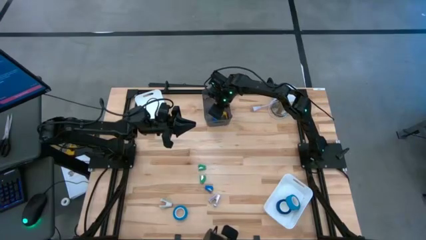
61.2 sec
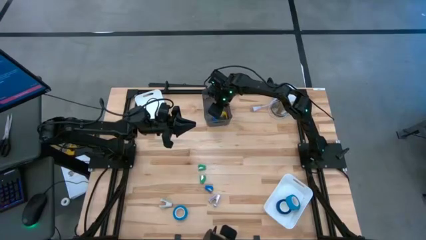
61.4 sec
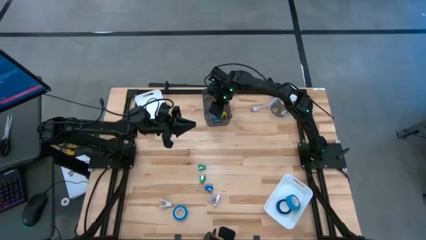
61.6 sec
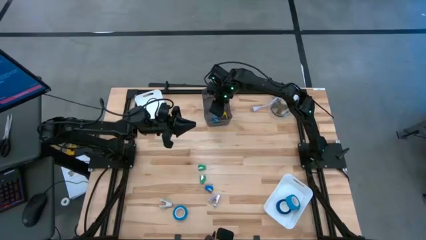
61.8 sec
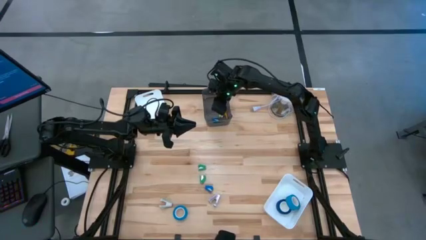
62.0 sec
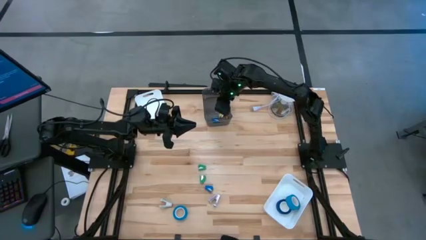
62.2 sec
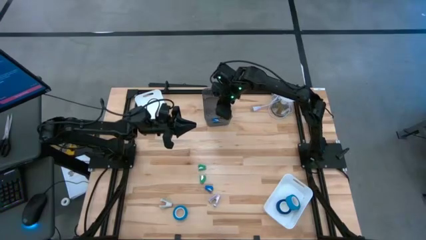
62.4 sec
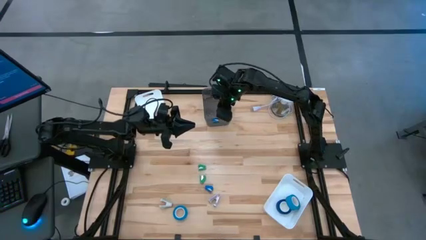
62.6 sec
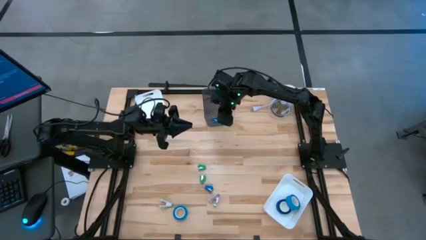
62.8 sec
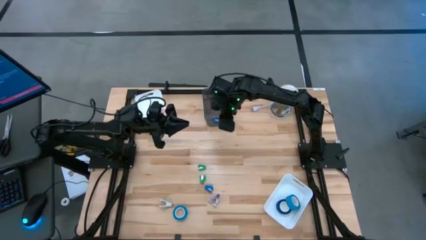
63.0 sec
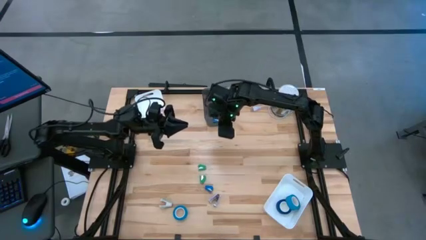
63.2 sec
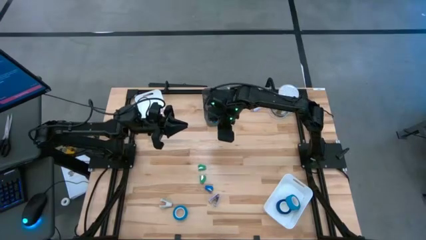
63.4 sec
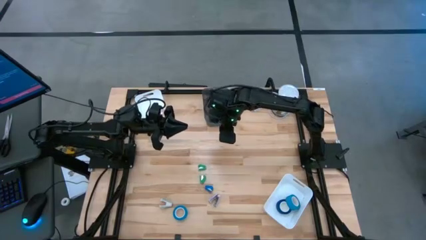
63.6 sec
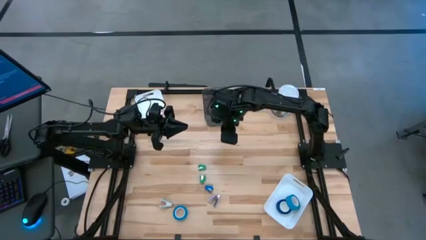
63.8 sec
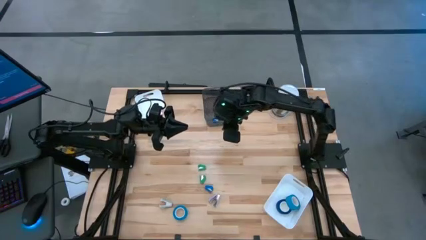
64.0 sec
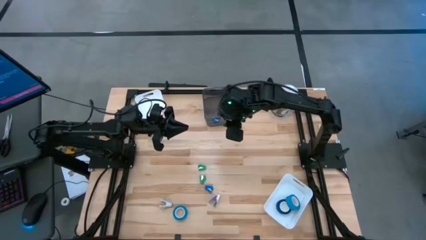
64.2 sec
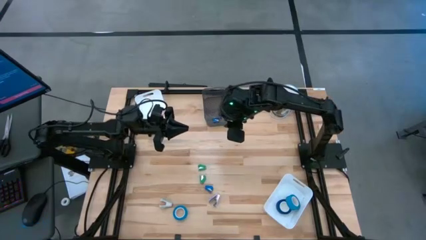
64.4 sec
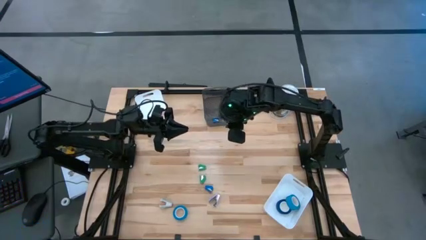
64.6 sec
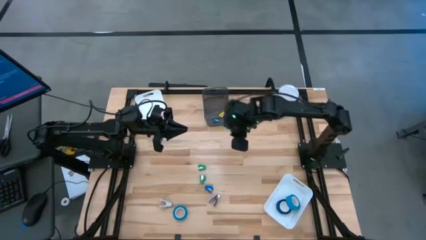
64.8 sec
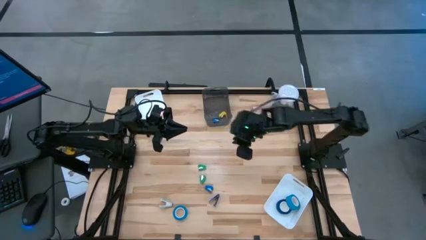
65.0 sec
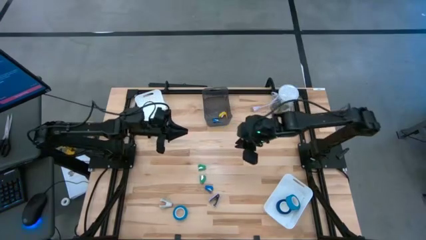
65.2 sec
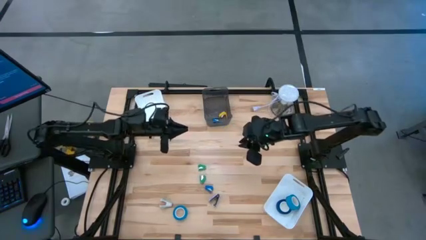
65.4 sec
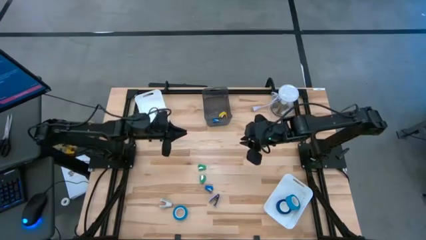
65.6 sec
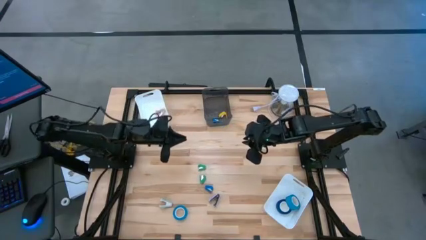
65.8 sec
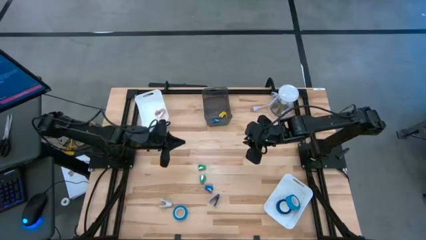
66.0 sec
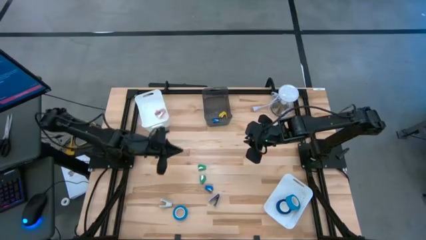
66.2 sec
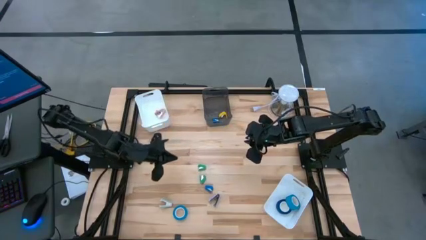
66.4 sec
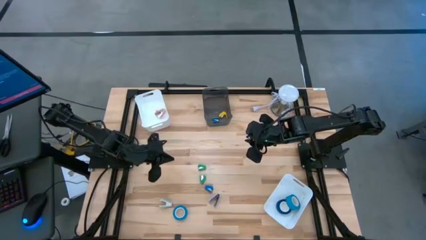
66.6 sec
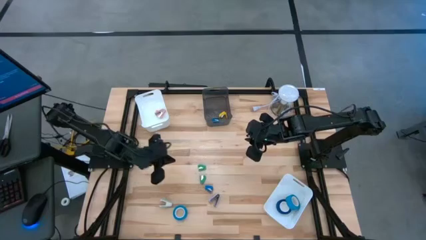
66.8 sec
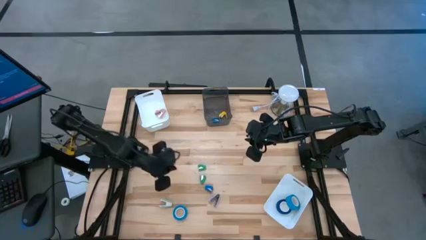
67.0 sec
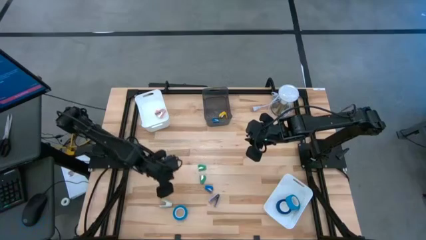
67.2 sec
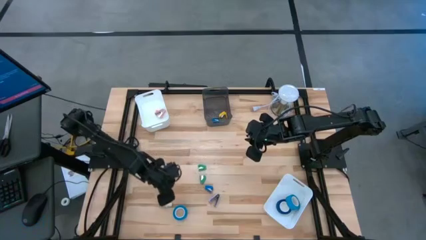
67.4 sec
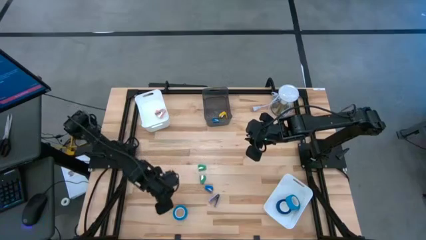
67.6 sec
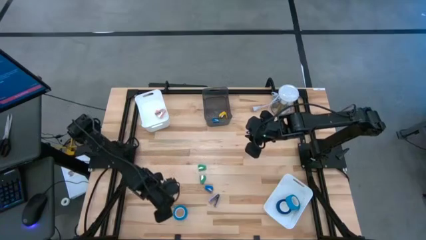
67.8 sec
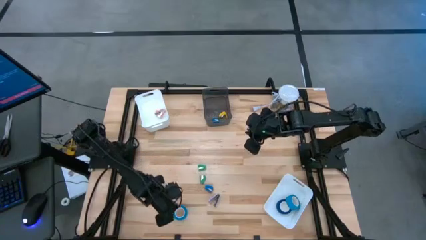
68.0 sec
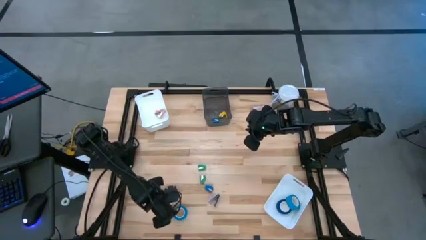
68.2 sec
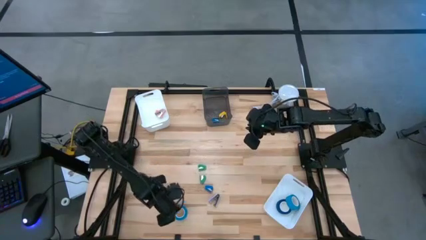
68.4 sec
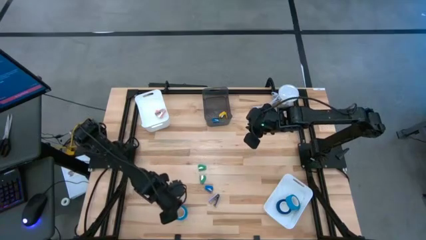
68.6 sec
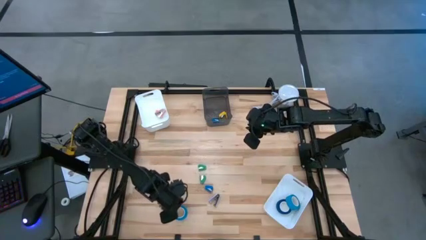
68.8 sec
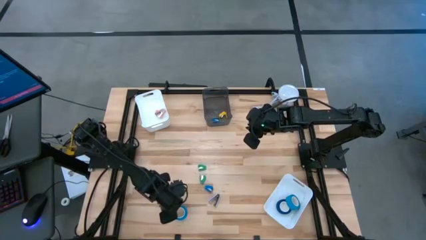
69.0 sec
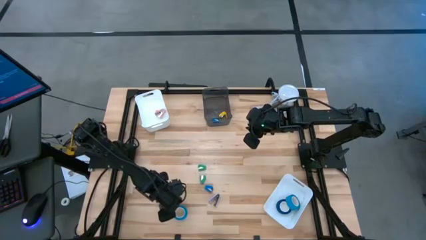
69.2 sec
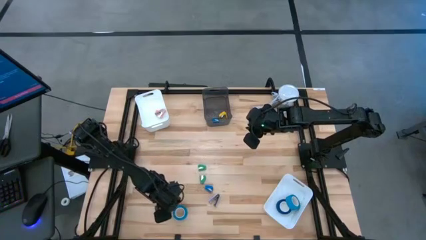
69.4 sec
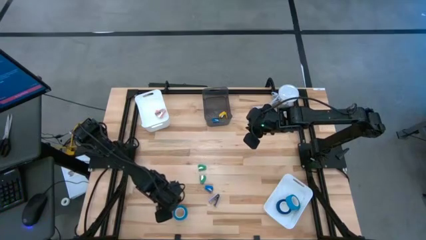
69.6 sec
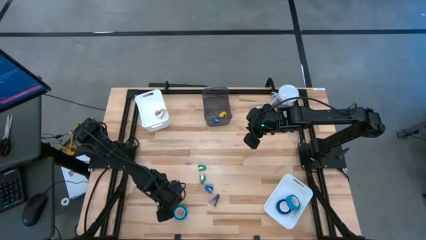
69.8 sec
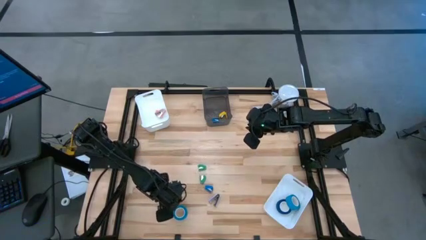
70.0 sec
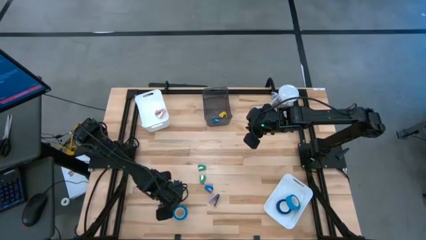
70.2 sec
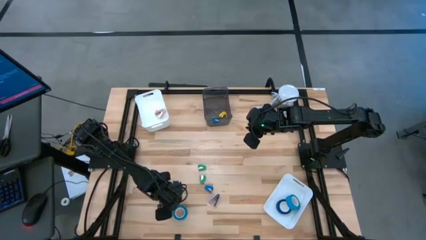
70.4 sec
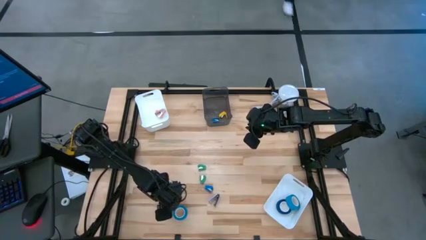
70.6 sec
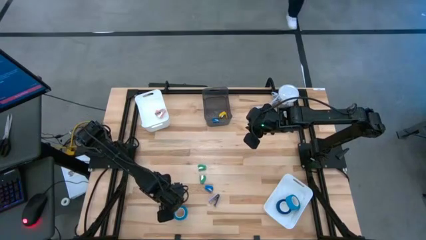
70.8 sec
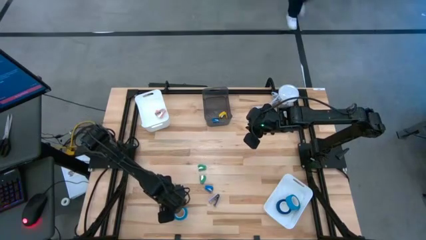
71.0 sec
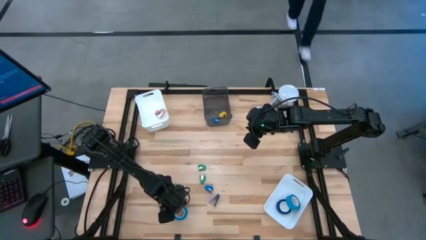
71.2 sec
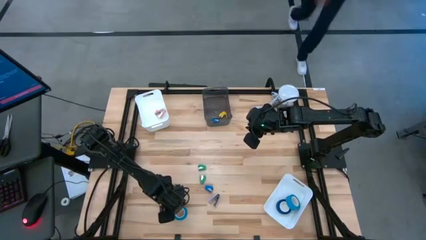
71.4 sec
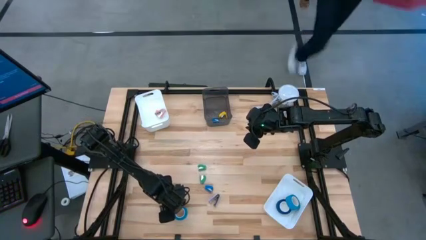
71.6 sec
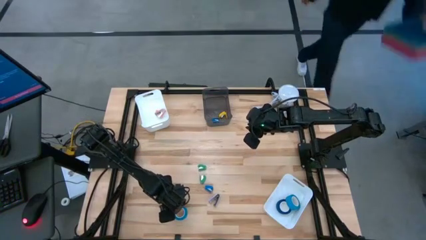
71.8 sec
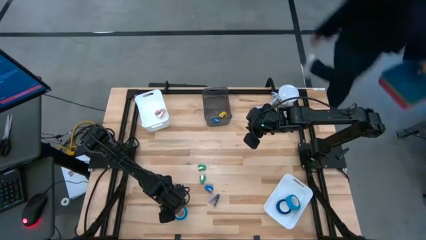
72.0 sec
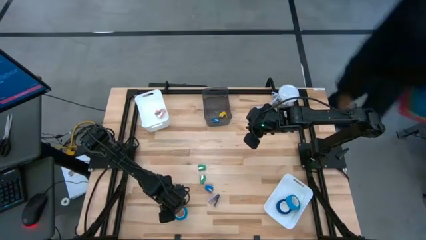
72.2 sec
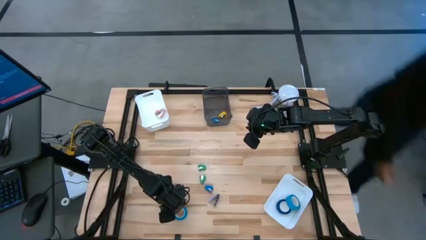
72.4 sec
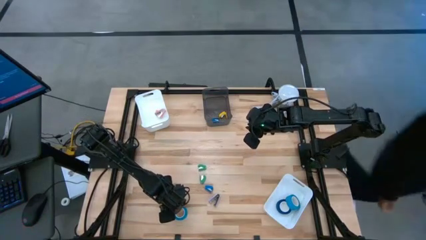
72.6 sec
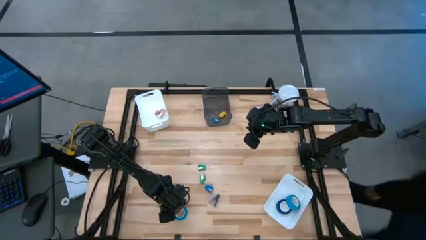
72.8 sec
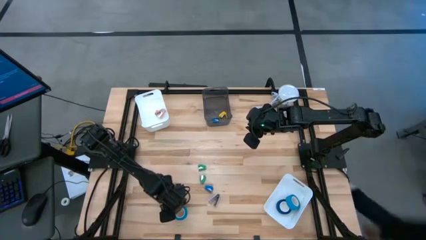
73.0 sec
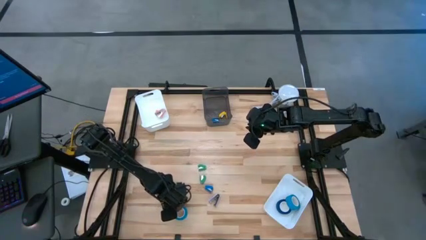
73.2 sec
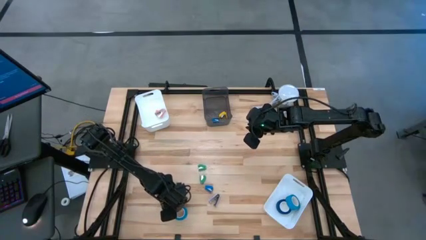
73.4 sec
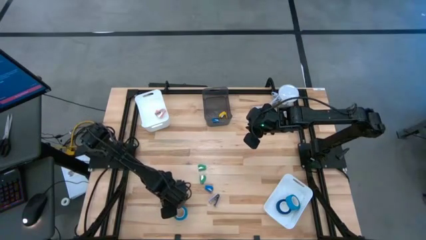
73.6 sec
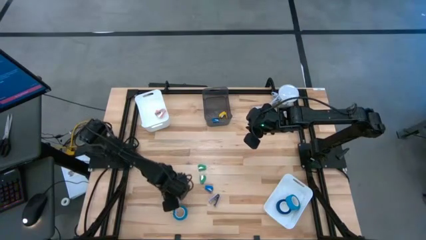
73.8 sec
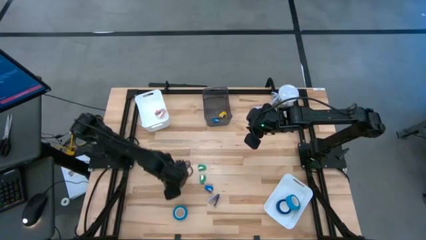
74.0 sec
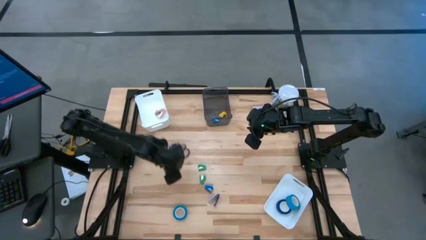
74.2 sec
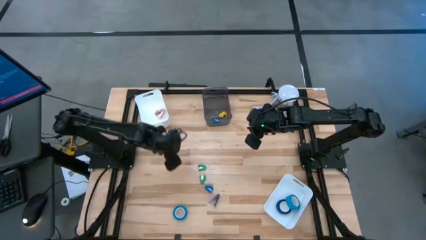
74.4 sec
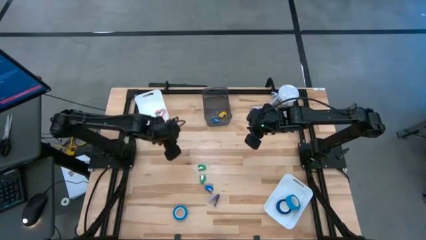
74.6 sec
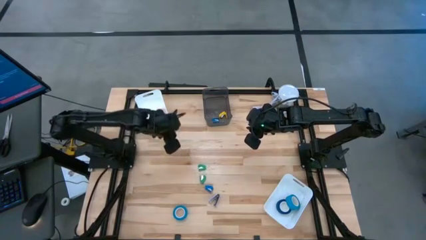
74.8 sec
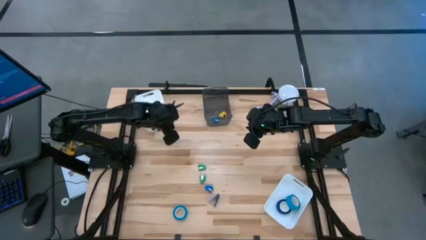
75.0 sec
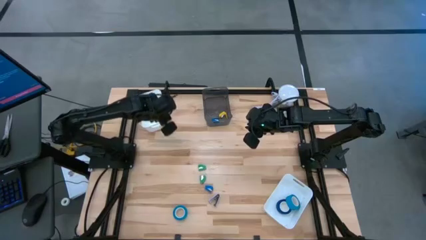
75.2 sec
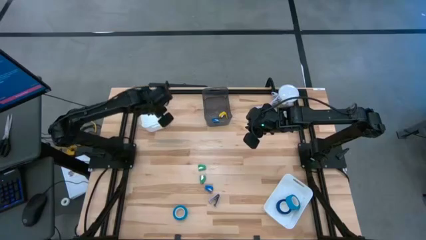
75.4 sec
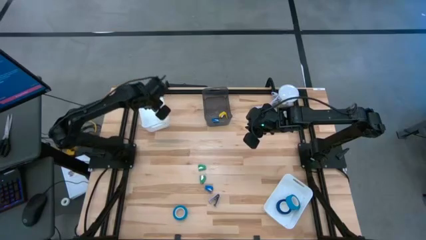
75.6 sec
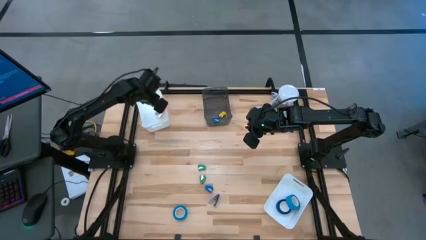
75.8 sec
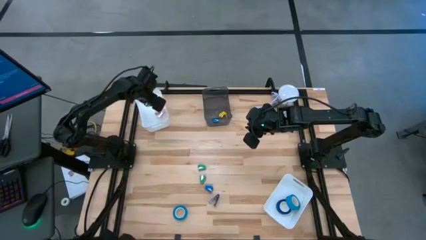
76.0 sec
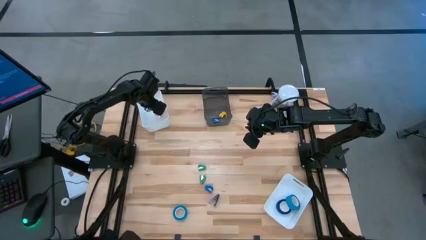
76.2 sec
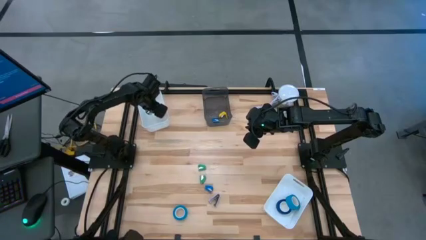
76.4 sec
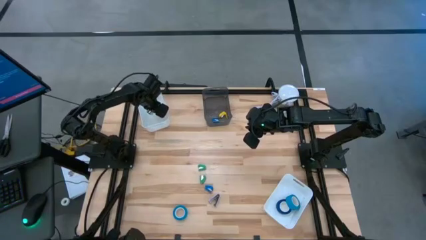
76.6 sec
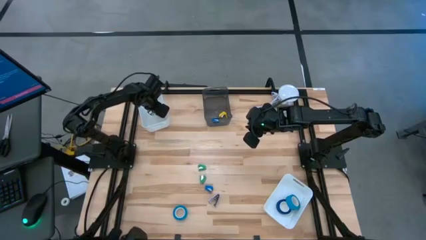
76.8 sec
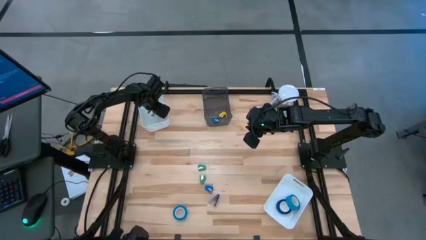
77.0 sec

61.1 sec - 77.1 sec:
Task: Pick and place Stapler, Stapler remover, tape
Put the gray staple remover into the top white bin

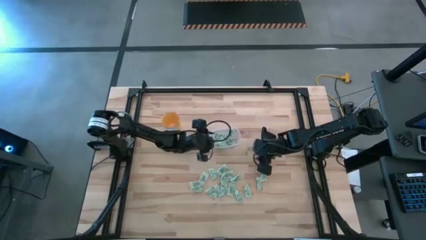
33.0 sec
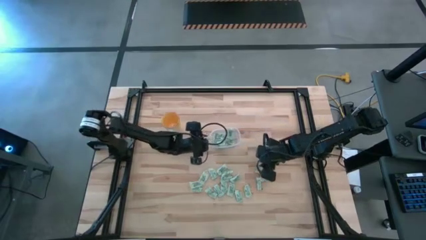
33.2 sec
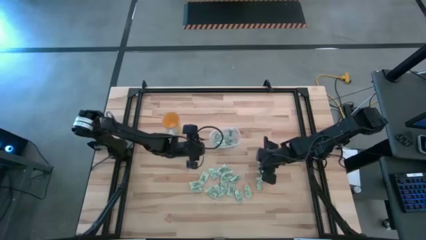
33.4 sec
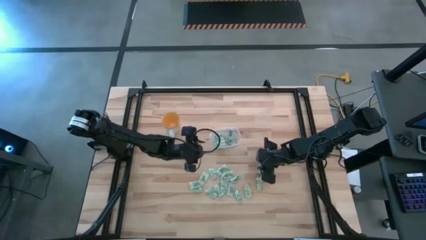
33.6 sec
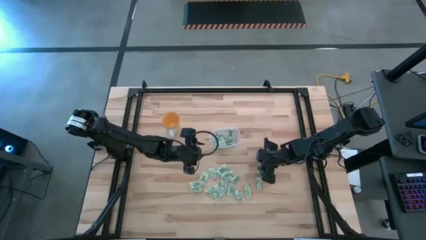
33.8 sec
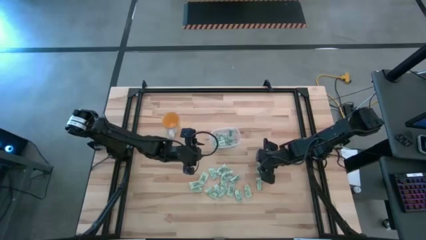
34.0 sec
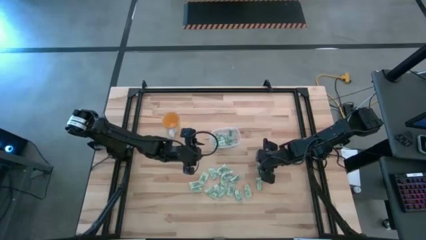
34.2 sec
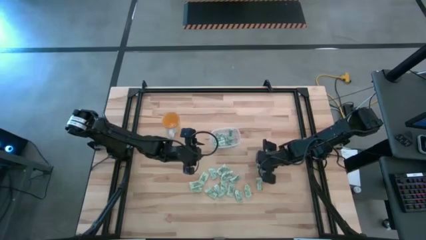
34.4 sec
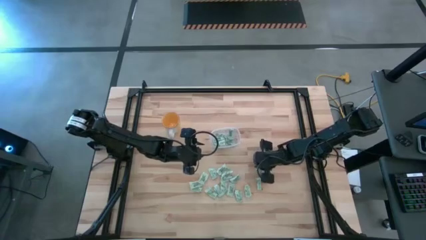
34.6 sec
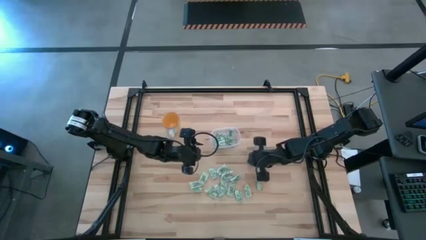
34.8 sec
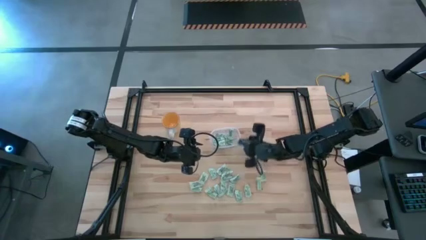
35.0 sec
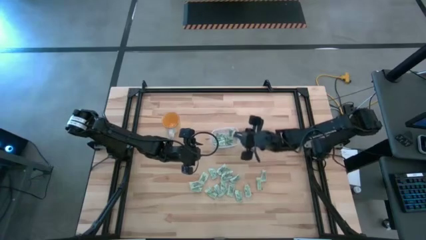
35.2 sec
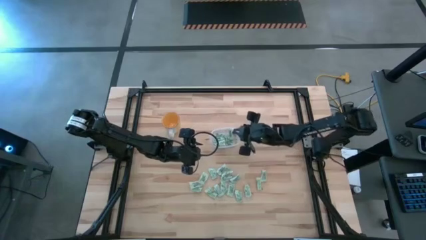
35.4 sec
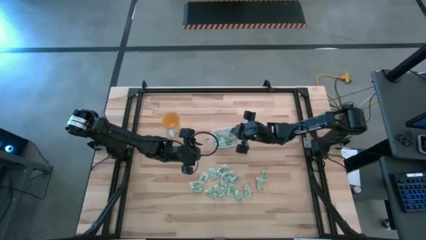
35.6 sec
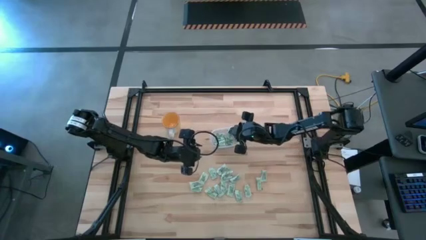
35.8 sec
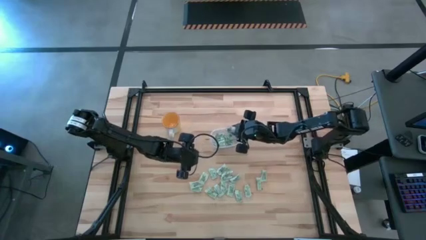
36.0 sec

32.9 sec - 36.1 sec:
Task: Pick and place Stevia / Truvia into bins
Put the stevia packet into the transparent bin
